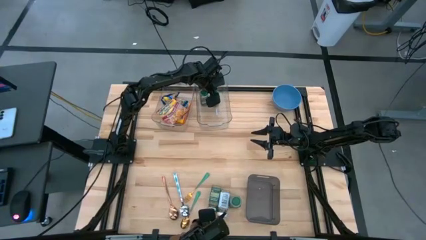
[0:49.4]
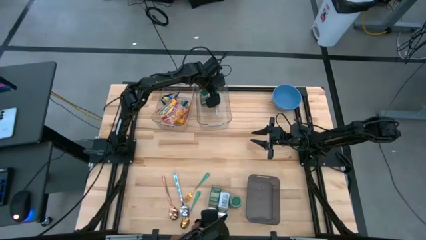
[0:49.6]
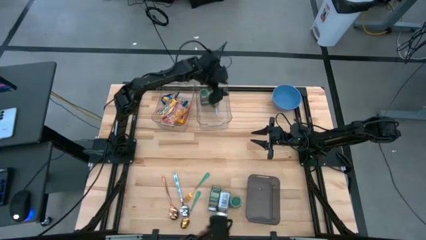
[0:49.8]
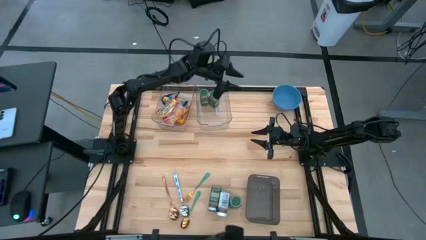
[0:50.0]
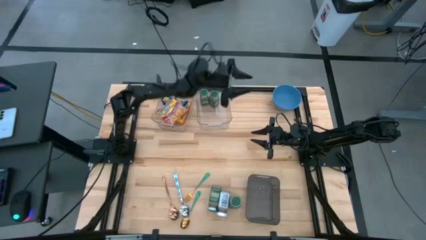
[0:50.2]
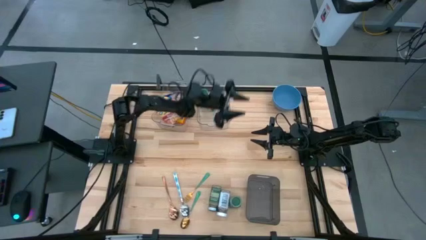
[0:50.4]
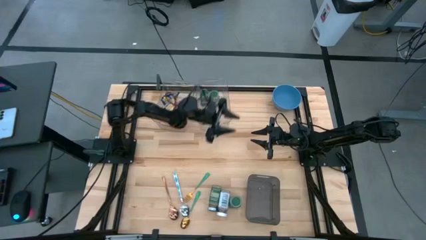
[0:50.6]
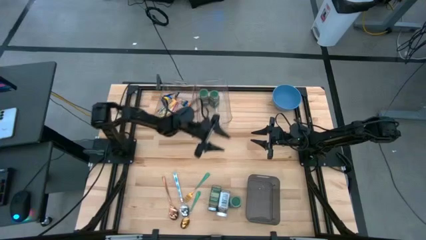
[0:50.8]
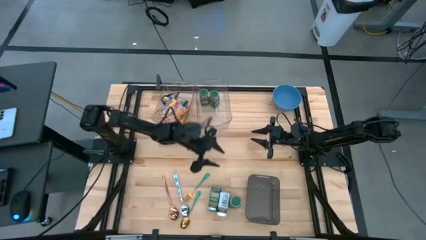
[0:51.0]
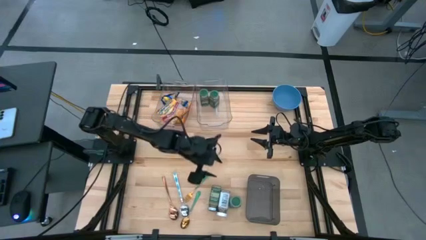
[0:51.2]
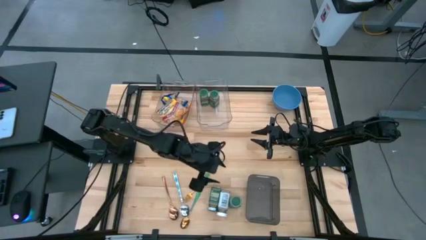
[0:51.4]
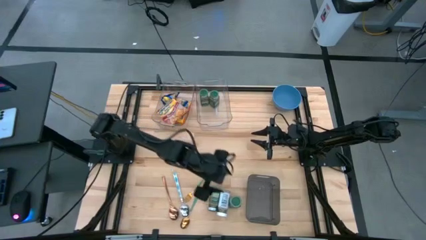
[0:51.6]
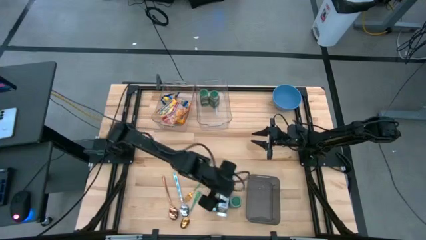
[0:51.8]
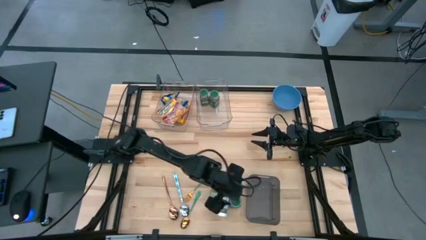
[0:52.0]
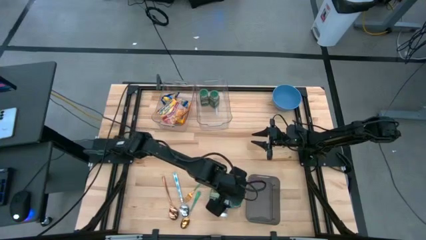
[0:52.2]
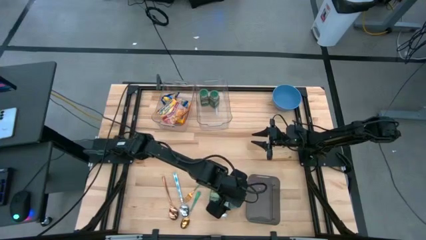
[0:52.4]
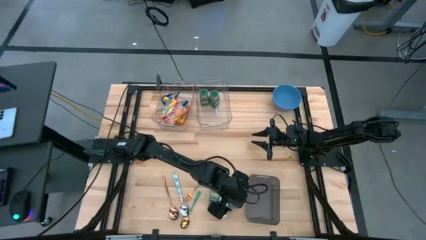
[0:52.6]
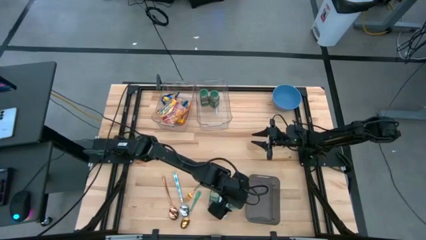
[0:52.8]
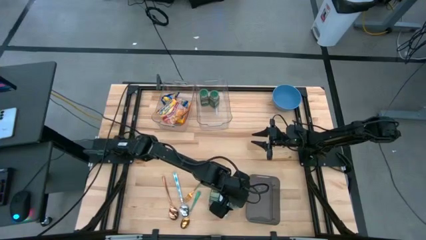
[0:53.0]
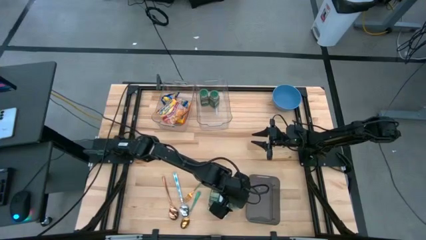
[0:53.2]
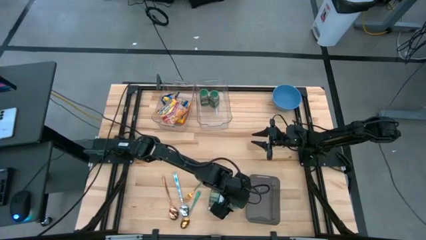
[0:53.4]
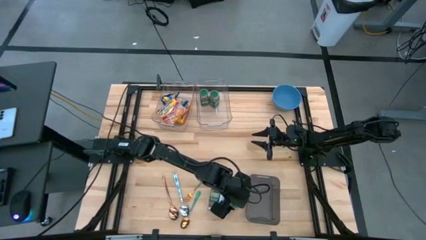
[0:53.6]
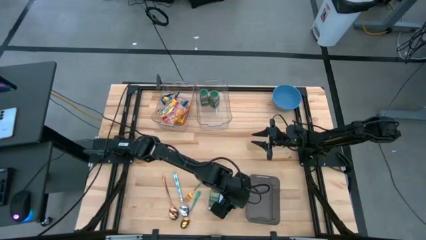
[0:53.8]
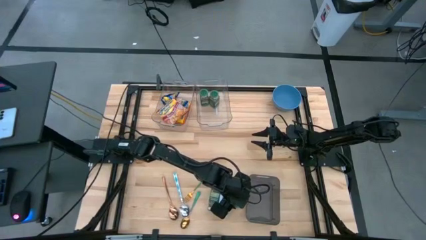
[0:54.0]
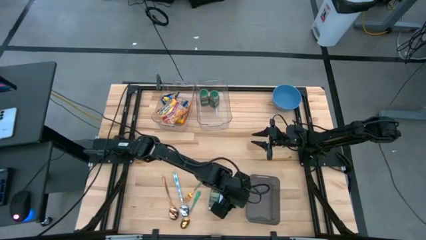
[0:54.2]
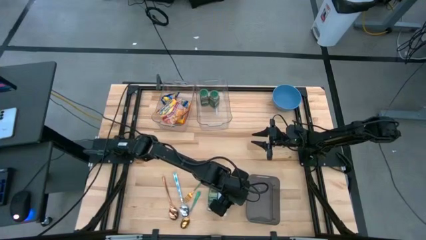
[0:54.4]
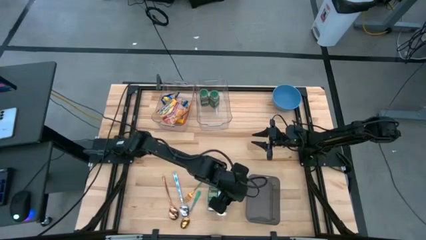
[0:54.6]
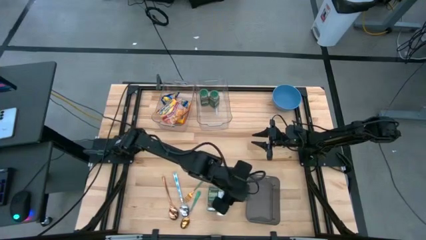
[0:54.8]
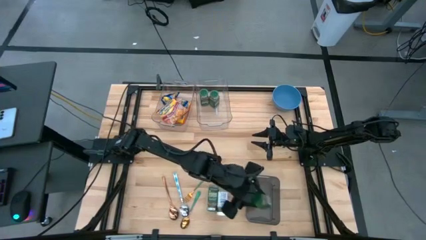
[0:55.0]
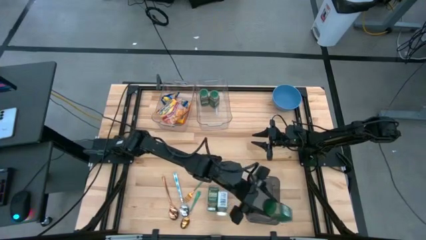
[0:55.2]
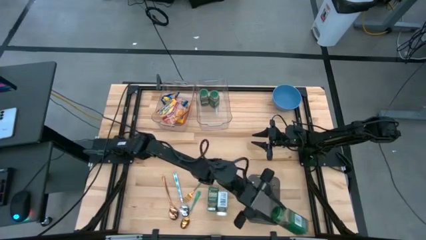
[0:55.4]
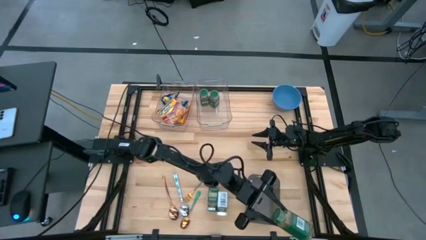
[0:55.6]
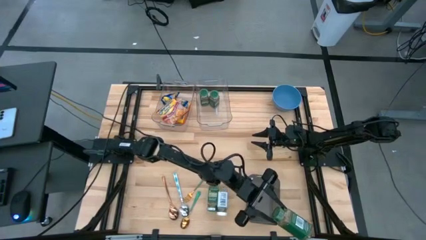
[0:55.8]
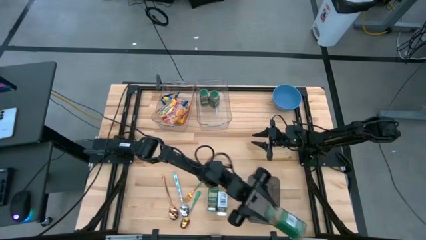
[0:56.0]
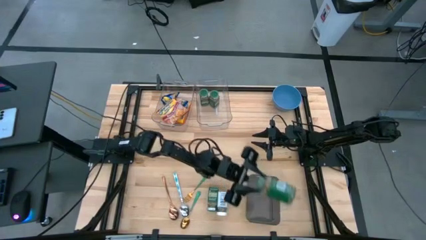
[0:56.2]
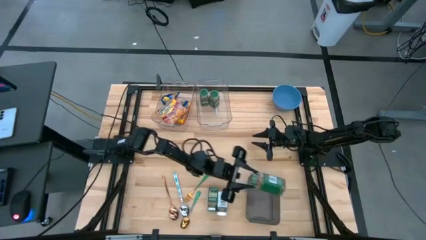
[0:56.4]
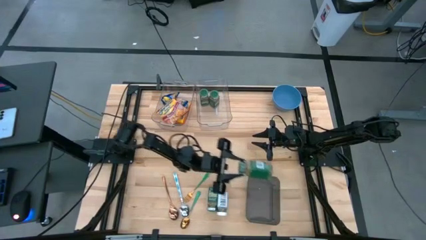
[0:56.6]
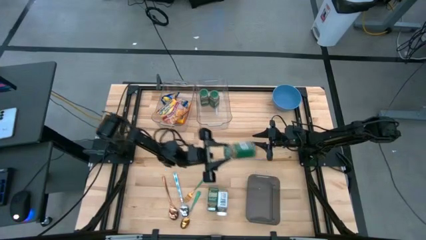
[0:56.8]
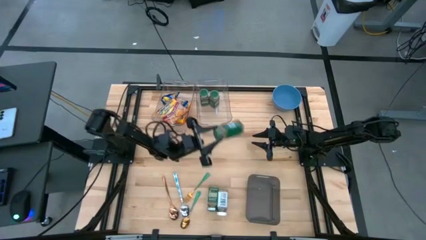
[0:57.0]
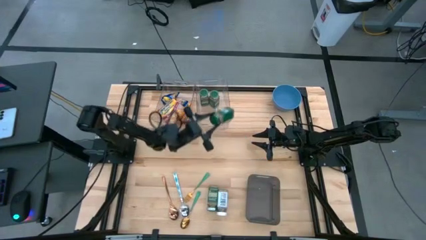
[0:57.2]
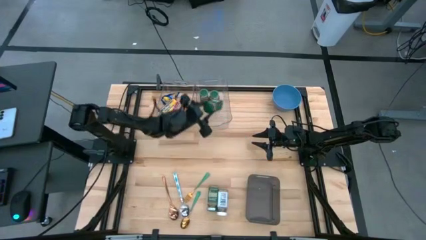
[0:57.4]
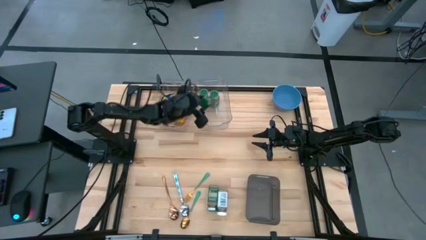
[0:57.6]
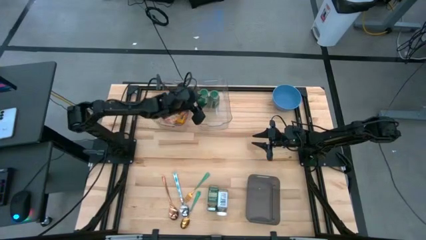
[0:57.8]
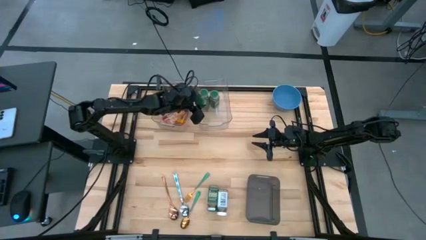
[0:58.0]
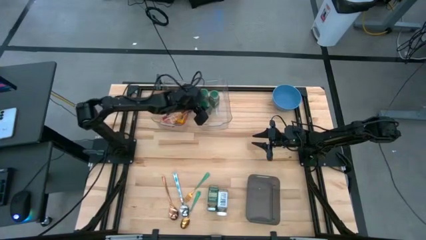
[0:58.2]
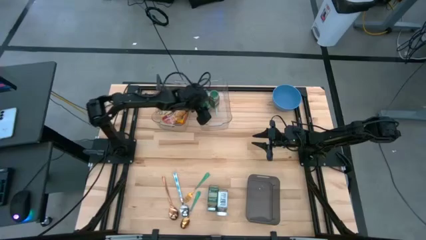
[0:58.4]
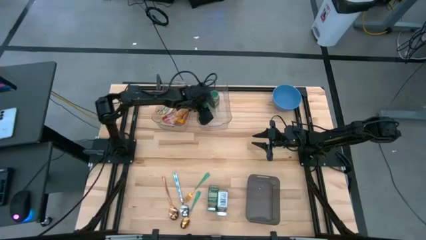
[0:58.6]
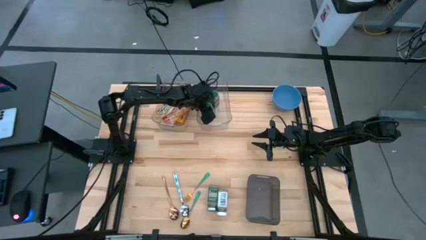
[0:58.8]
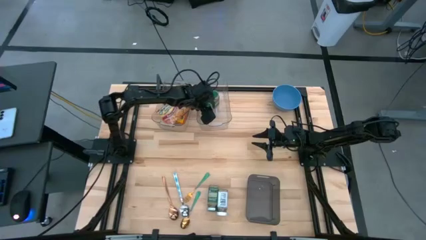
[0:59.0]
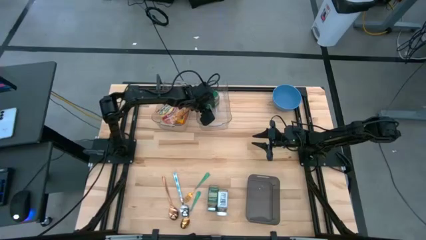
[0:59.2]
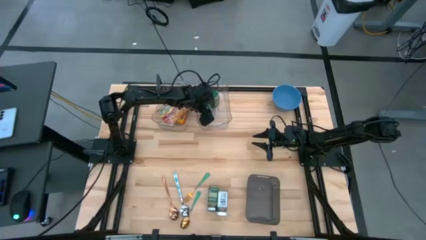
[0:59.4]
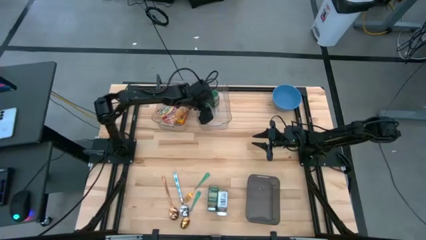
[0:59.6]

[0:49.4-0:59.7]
Put the right green spice bottle into the right transparent bin

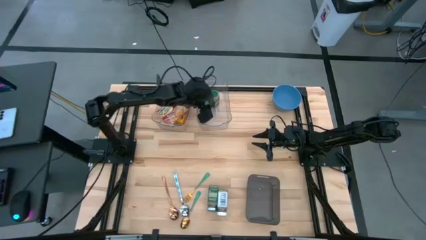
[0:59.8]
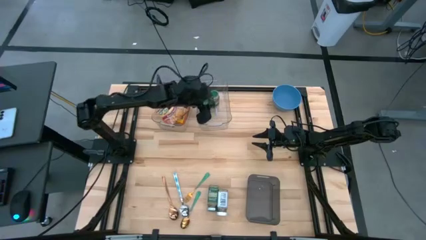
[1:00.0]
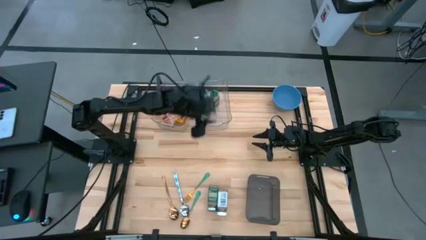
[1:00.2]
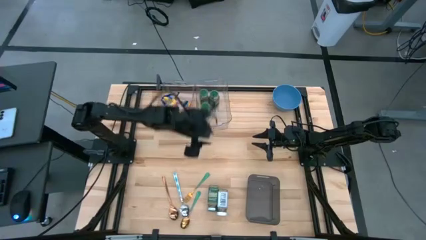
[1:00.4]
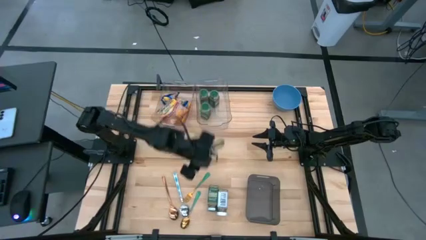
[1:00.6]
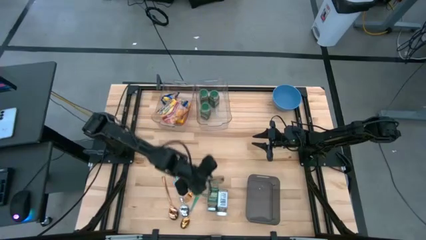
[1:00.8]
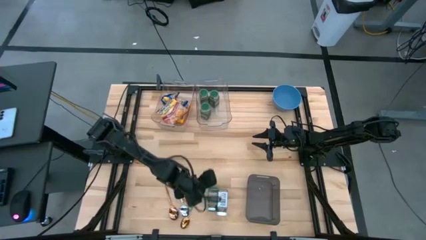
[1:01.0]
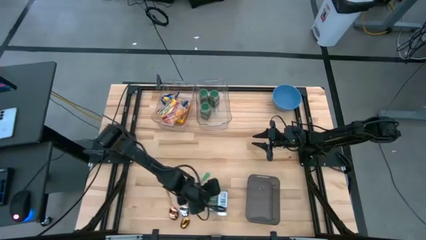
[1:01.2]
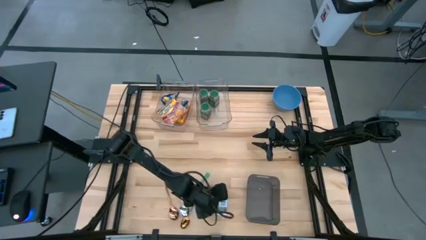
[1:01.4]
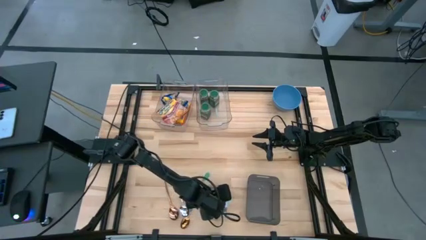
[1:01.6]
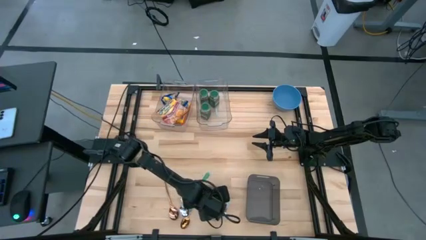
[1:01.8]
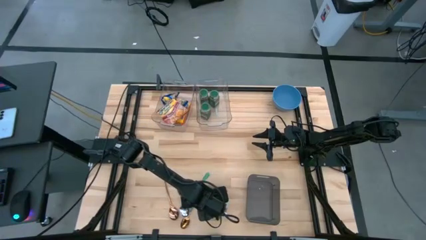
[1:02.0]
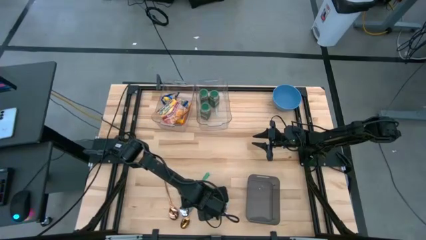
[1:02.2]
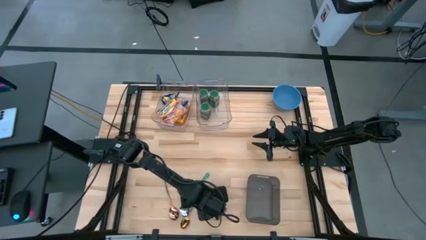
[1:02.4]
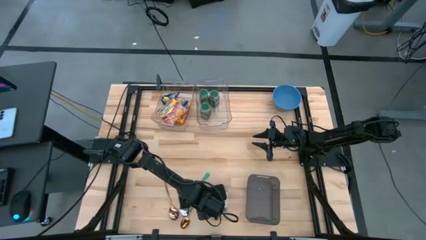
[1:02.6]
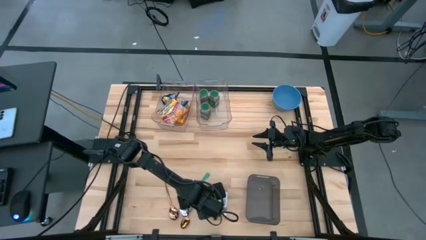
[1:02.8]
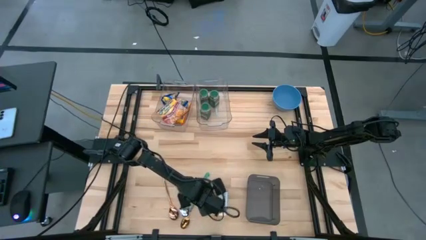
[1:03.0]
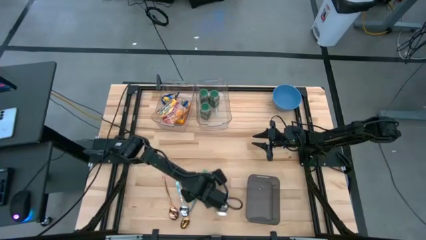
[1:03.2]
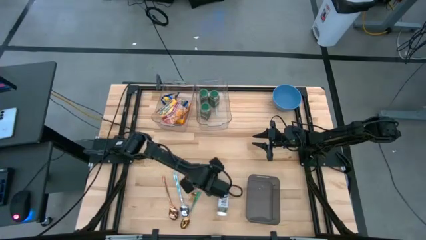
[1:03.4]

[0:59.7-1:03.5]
Put the green spice bottle into the right transparent bin
